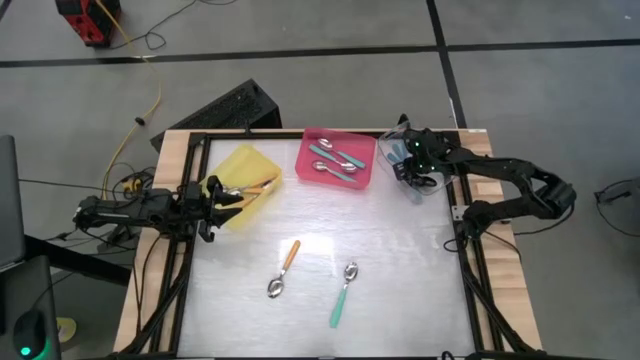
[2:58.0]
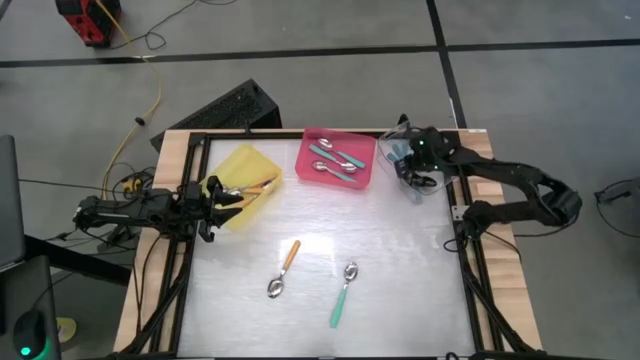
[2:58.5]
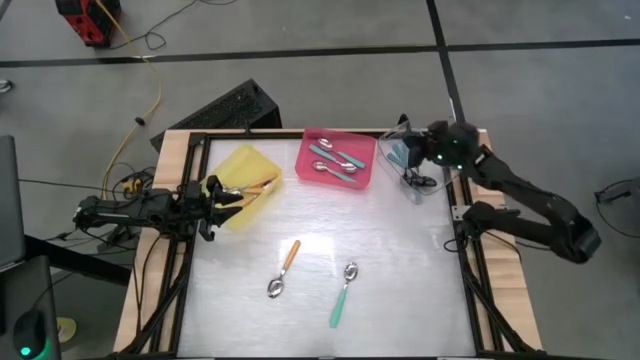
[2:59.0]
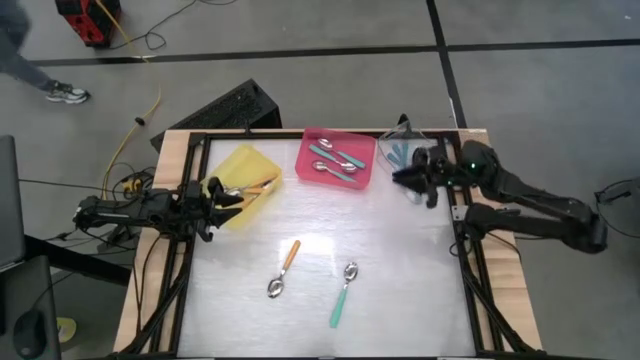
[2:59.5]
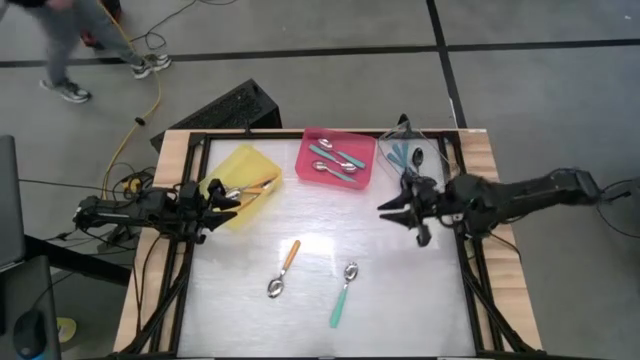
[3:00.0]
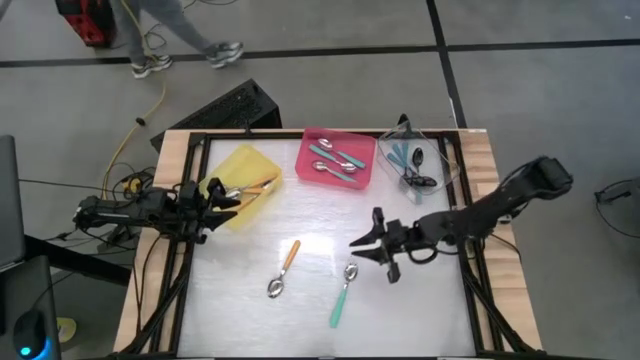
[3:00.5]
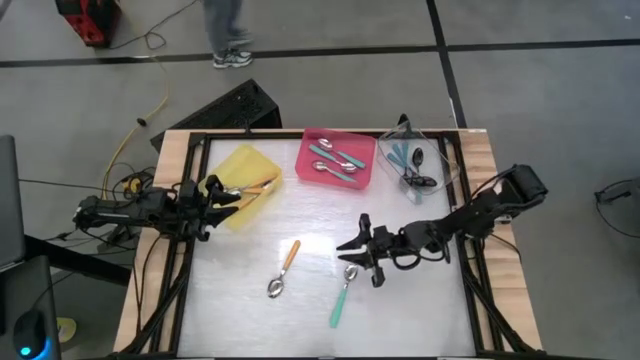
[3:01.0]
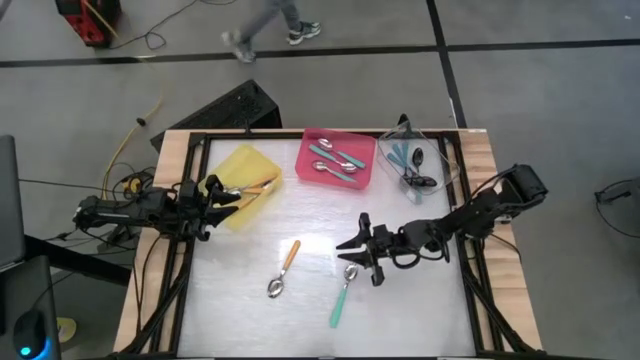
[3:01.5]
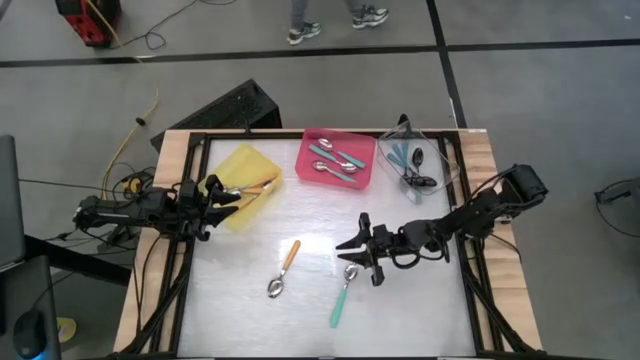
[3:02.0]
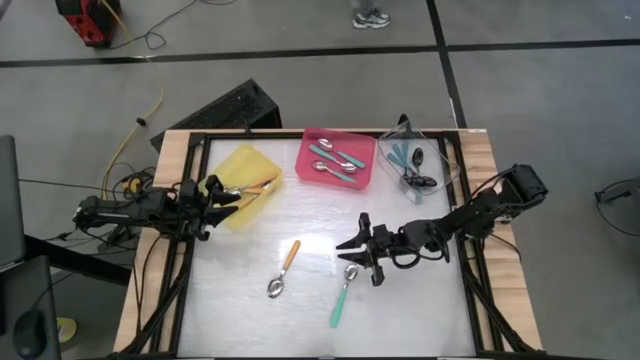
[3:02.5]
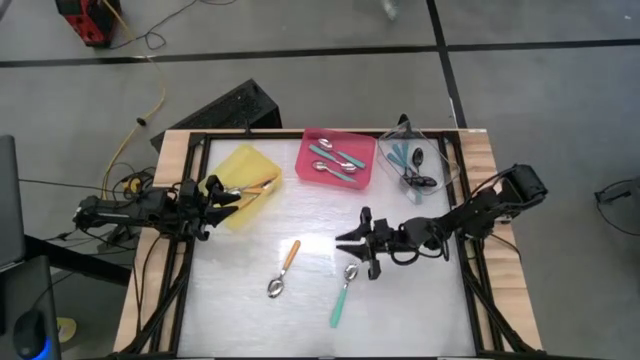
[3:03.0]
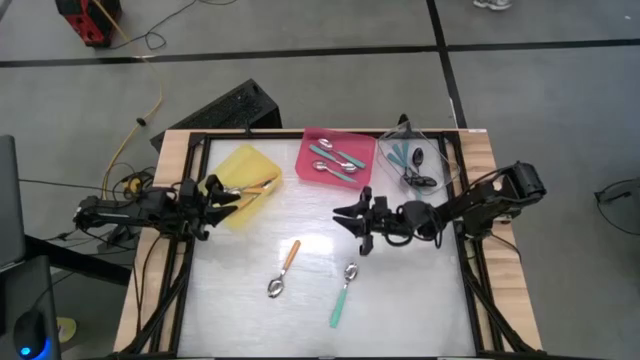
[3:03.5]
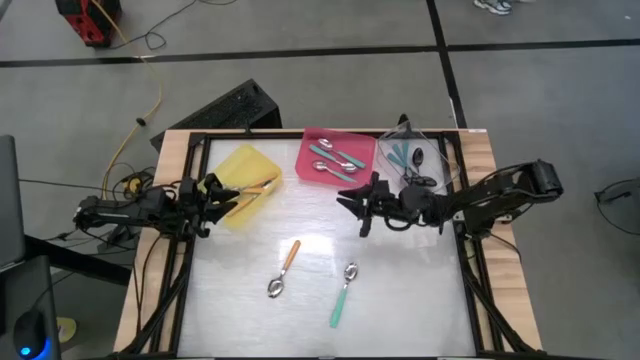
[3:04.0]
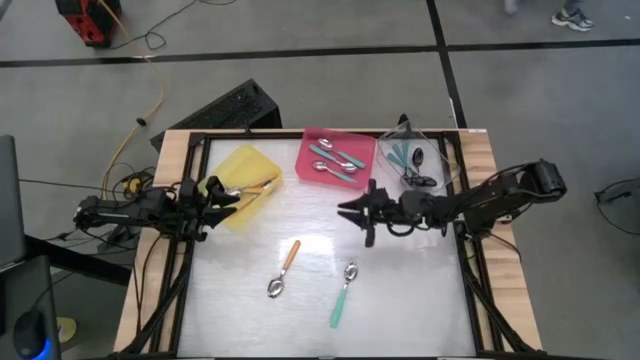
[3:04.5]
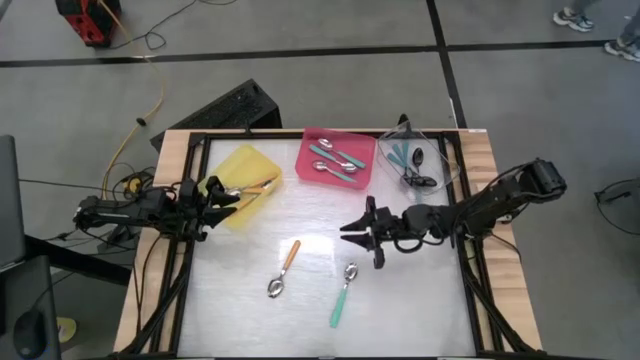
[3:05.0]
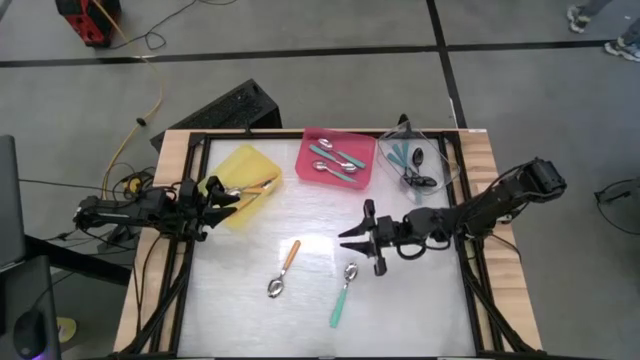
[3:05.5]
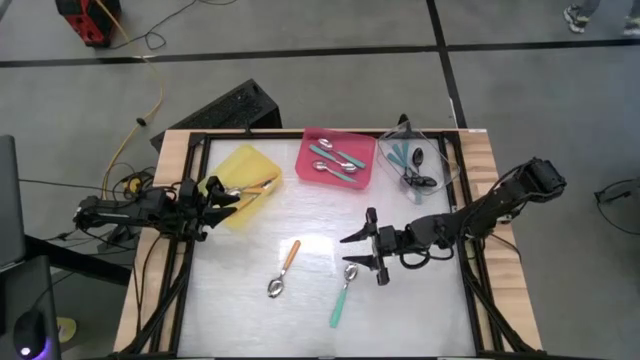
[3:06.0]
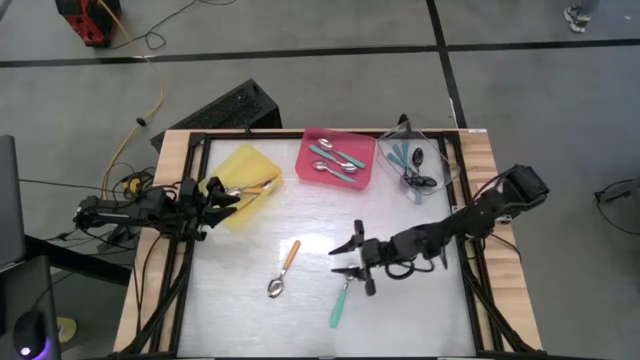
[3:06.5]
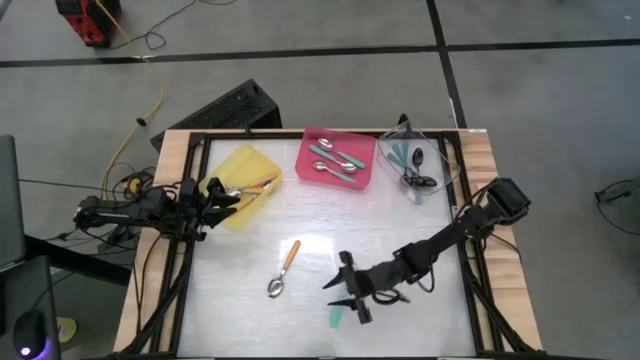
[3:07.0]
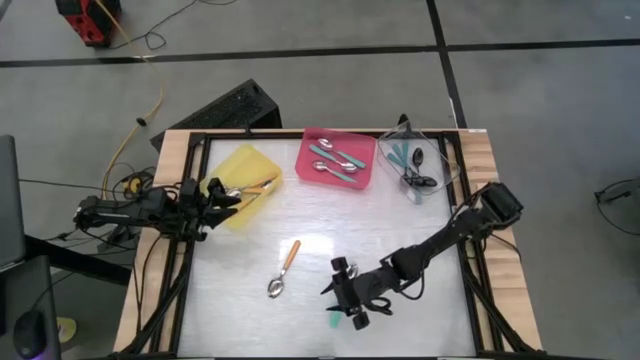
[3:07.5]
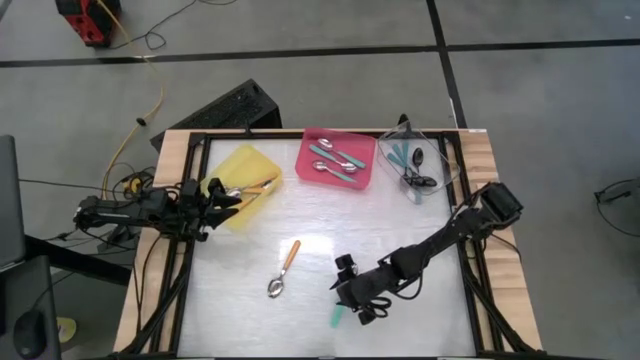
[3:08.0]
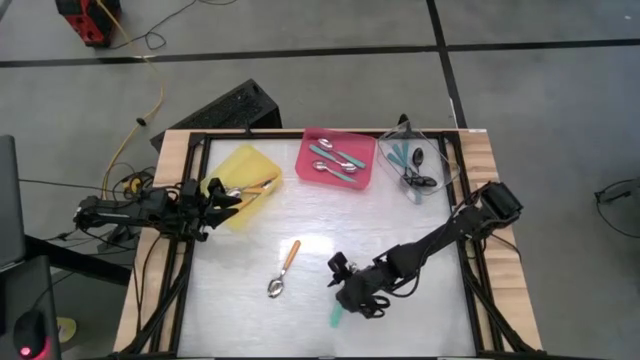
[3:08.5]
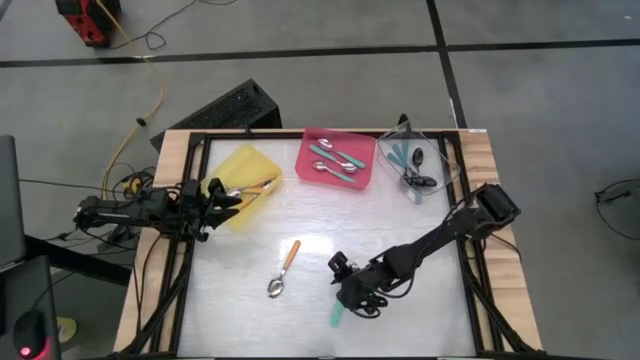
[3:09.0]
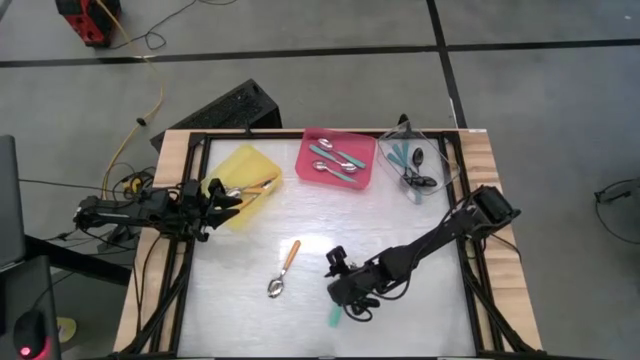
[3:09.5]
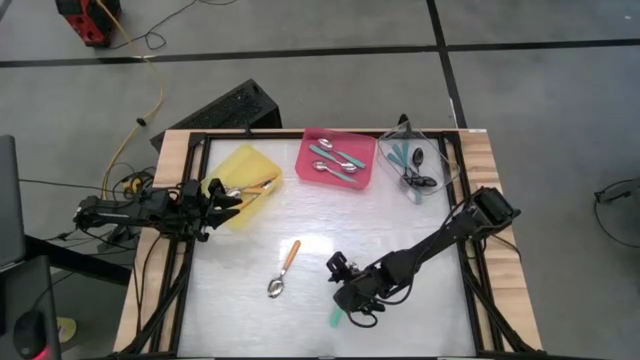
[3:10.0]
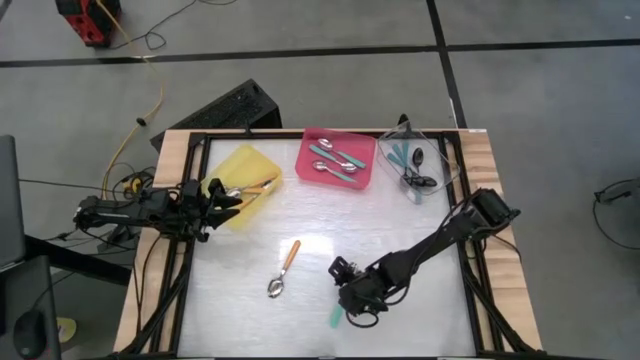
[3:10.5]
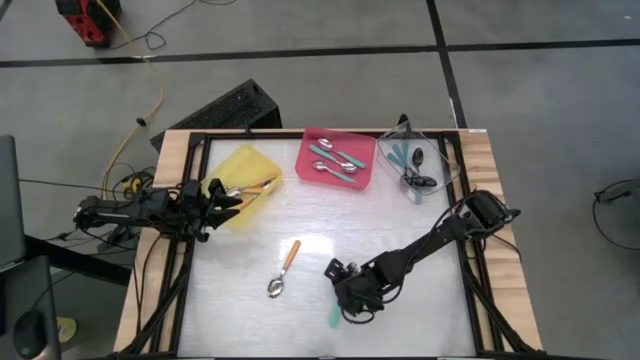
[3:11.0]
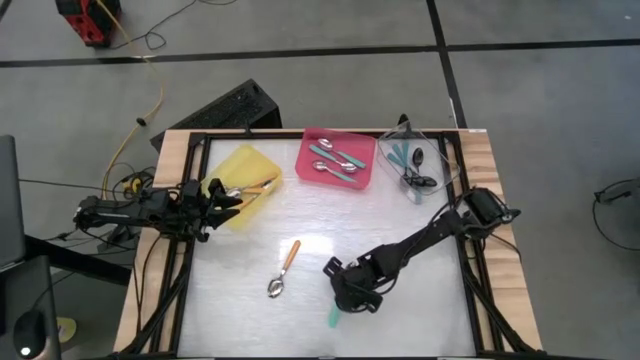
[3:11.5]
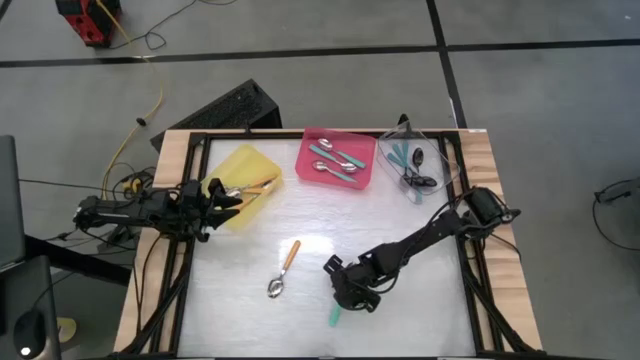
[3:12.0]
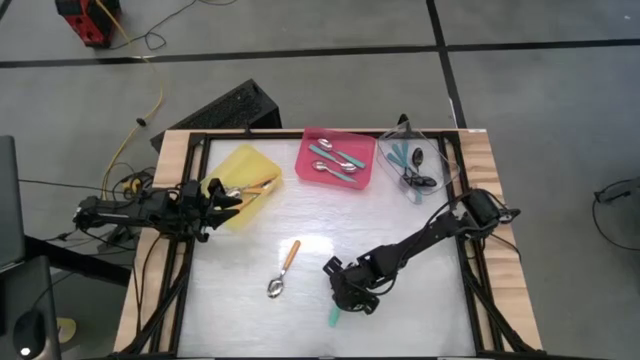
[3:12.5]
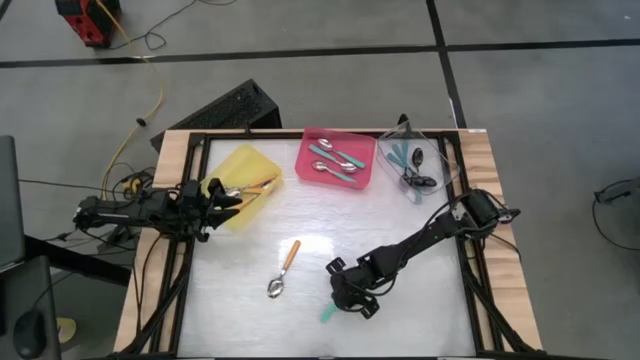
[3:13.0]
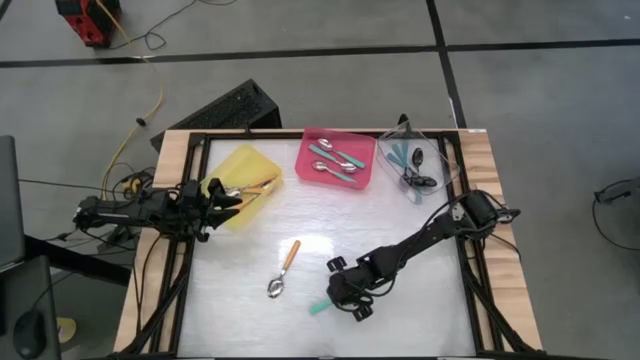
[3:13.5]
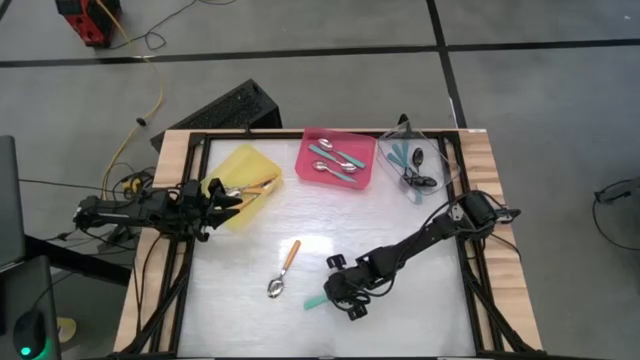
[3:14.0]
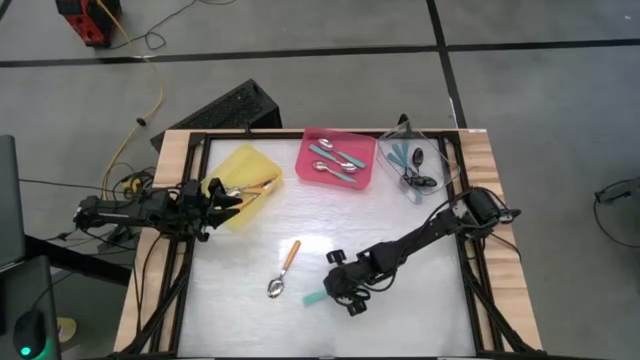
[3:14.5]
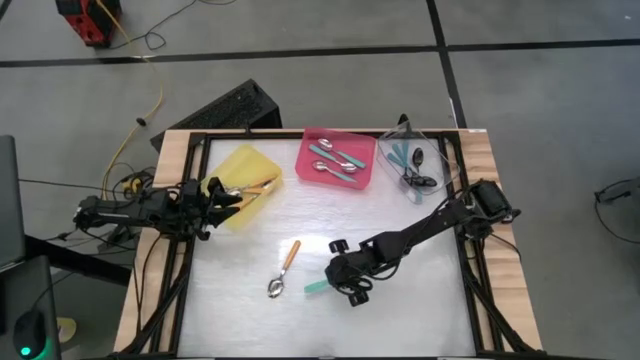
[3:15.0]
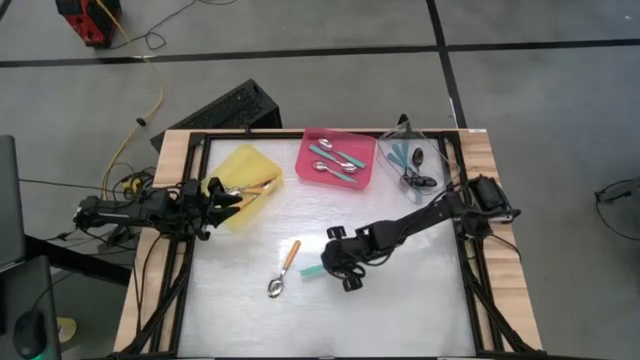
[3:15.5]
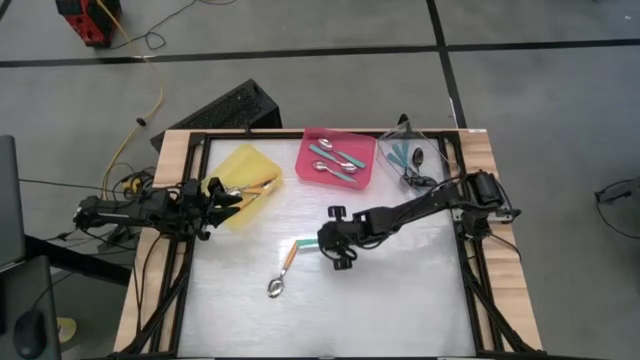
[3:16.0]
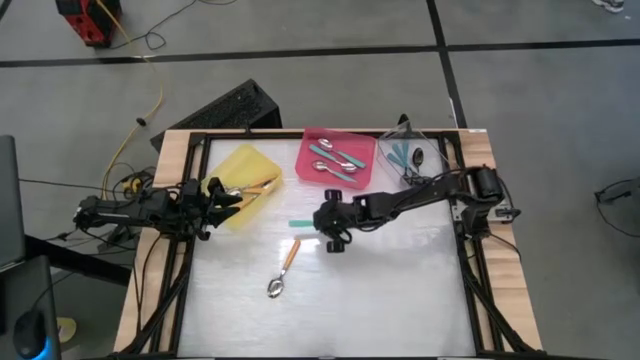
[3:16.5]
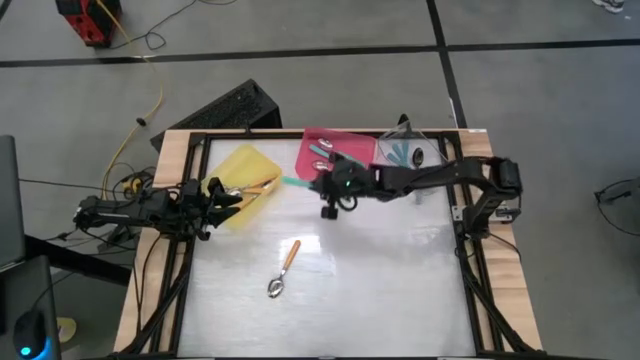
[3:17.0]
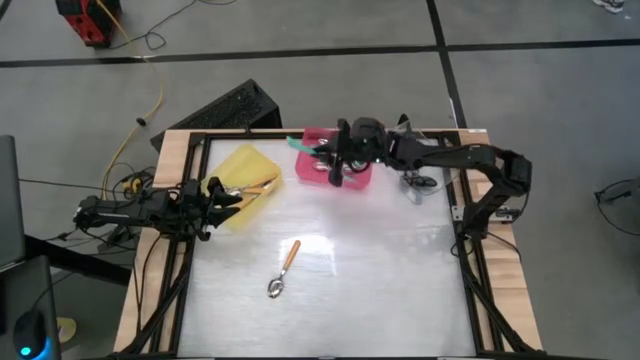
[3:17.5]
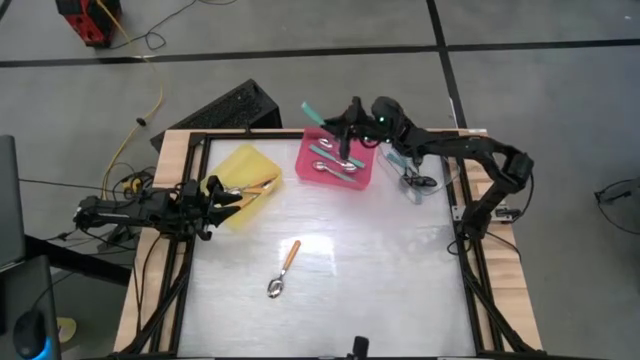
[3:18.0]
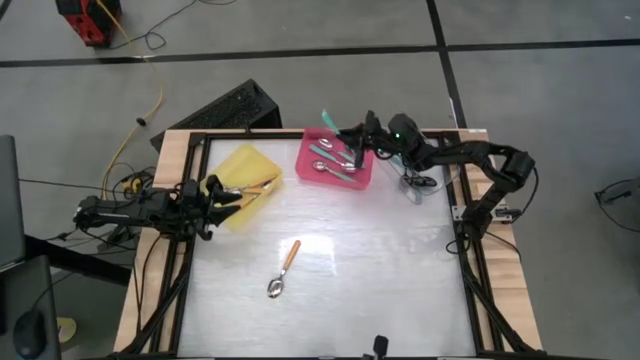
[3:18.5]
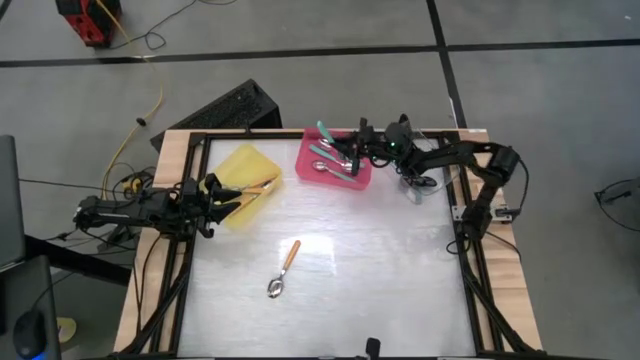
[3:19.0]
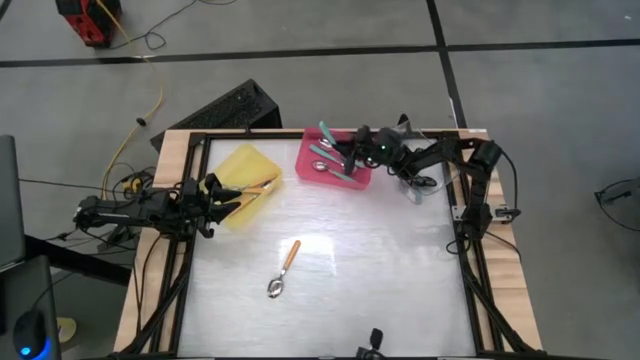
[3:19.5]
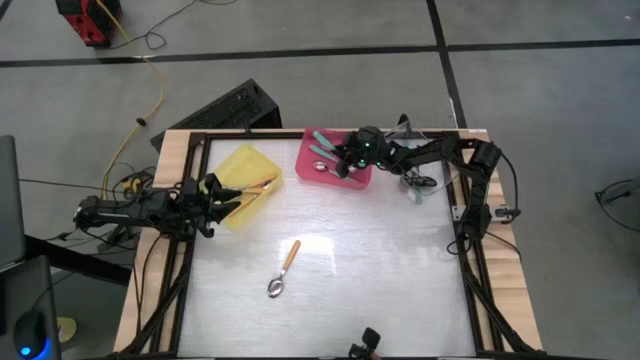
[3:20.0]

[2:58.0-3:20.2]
Task: Sort silverware by color (type)
Put the green spoon into the red bin
